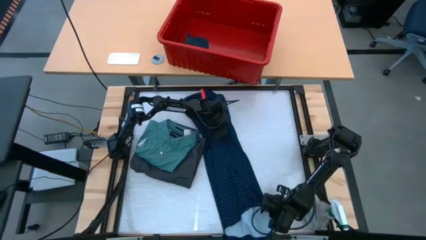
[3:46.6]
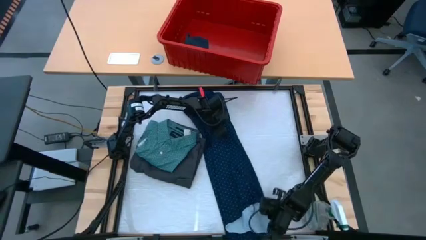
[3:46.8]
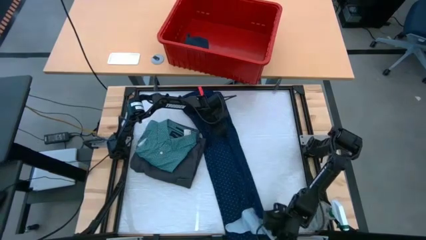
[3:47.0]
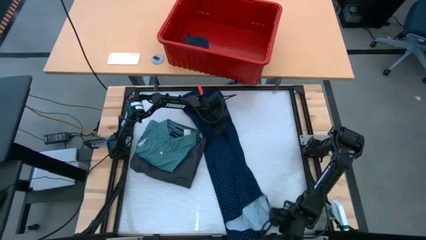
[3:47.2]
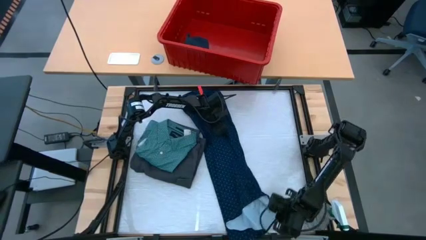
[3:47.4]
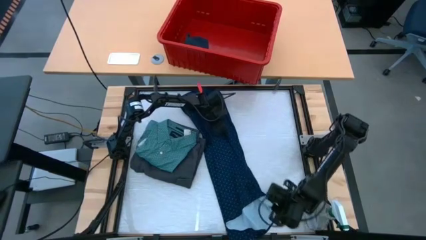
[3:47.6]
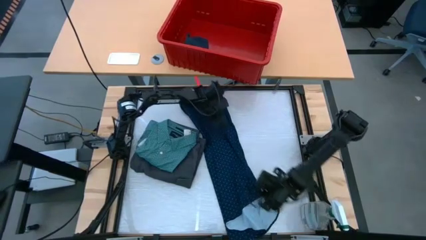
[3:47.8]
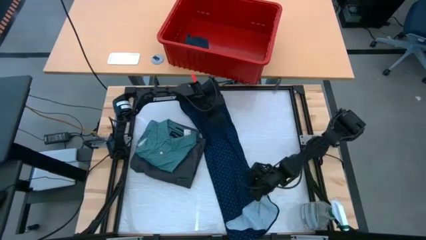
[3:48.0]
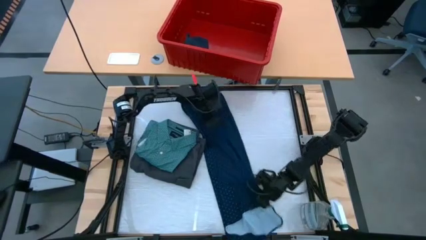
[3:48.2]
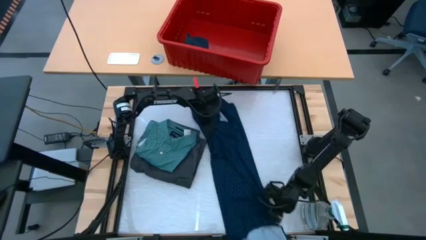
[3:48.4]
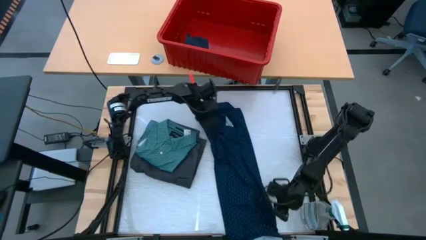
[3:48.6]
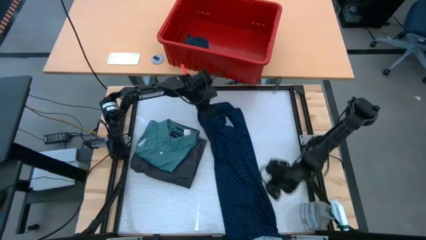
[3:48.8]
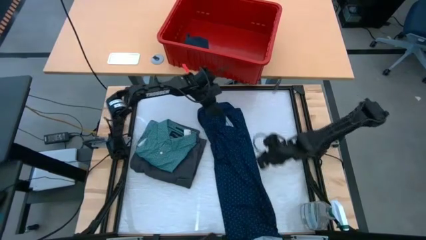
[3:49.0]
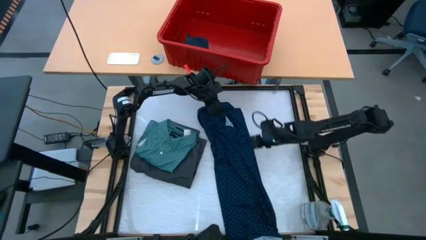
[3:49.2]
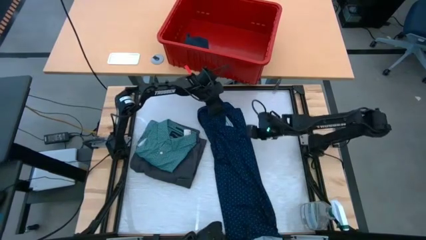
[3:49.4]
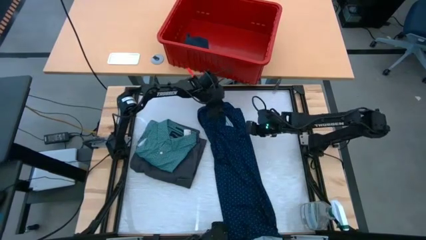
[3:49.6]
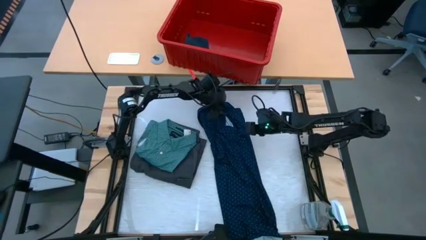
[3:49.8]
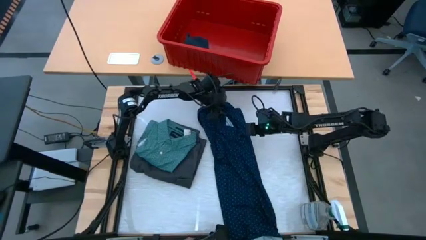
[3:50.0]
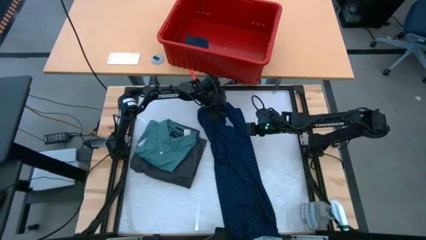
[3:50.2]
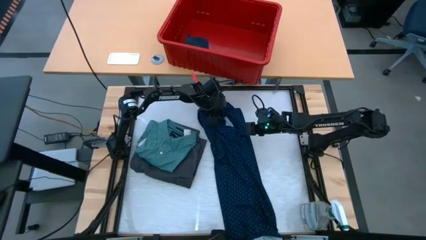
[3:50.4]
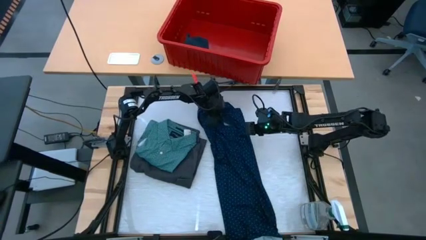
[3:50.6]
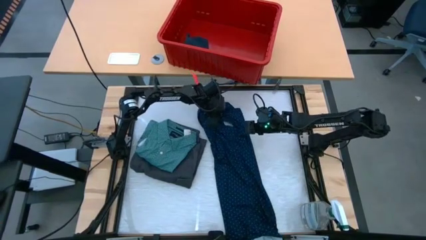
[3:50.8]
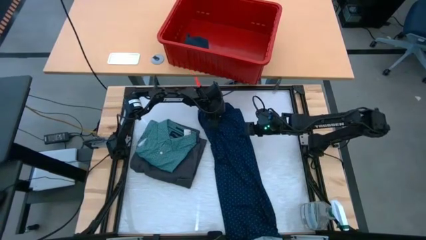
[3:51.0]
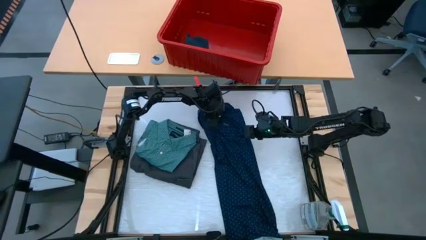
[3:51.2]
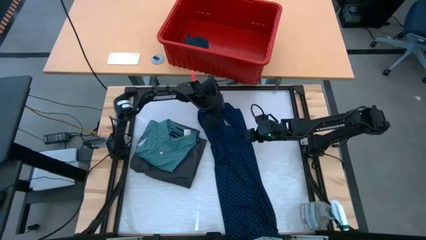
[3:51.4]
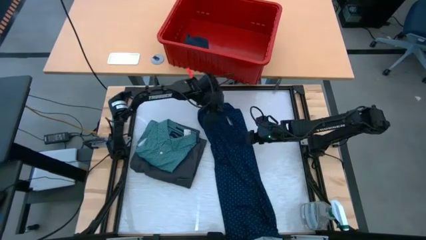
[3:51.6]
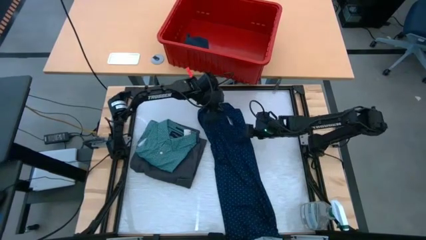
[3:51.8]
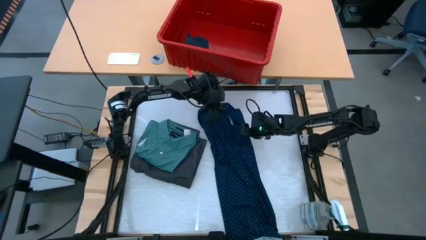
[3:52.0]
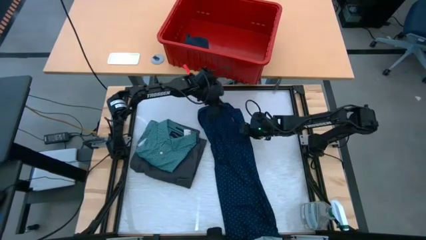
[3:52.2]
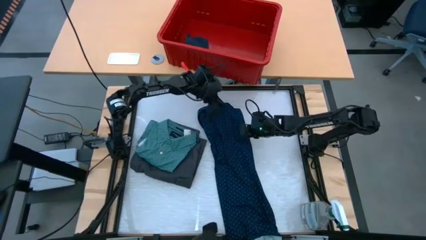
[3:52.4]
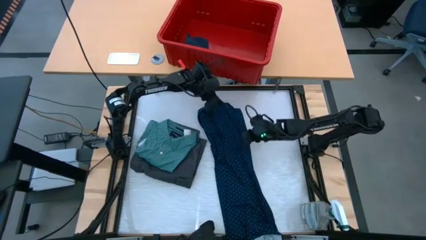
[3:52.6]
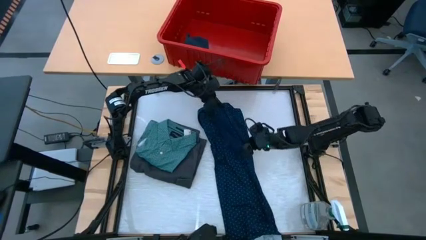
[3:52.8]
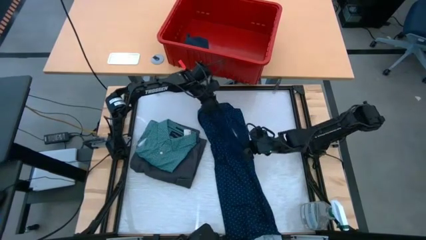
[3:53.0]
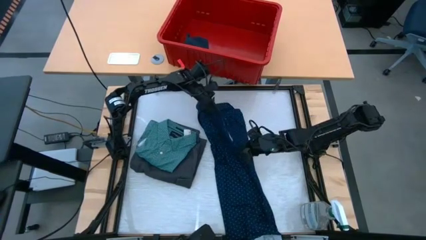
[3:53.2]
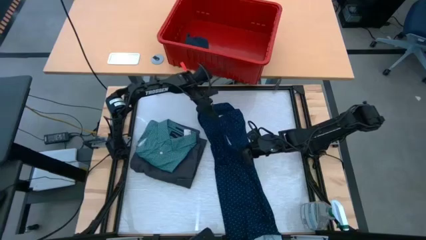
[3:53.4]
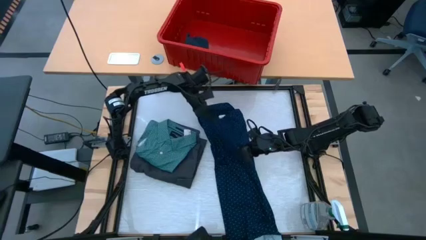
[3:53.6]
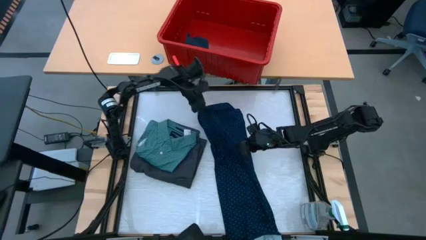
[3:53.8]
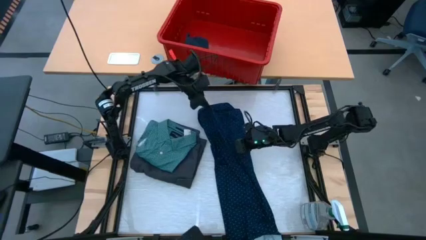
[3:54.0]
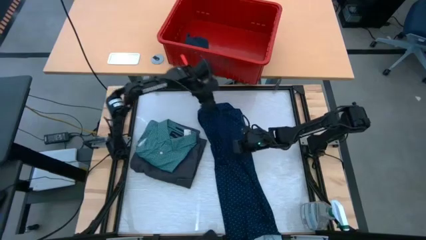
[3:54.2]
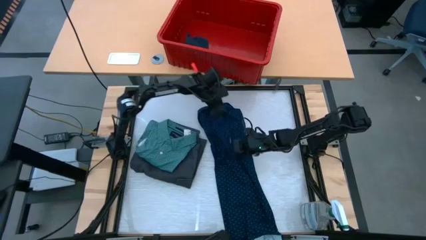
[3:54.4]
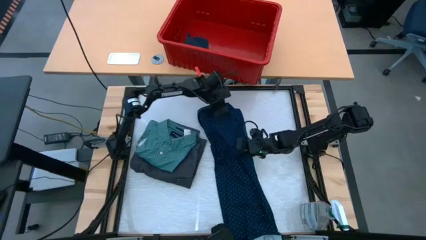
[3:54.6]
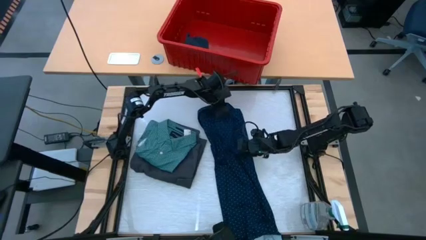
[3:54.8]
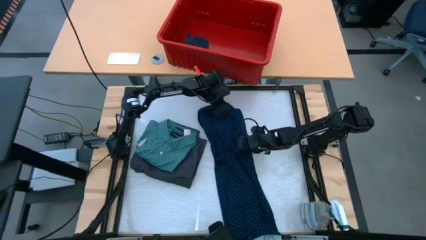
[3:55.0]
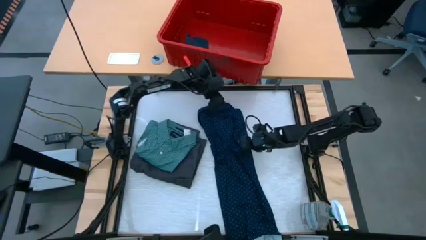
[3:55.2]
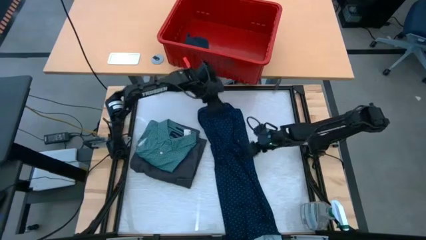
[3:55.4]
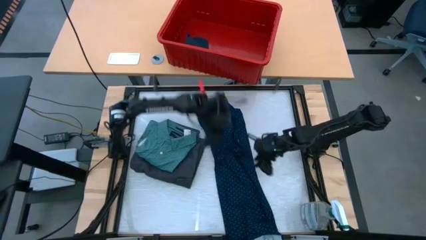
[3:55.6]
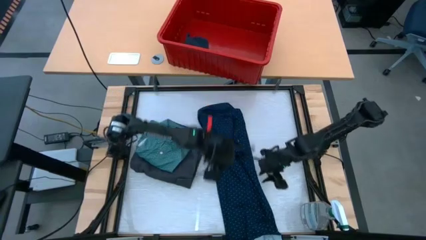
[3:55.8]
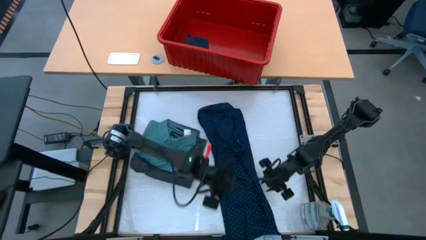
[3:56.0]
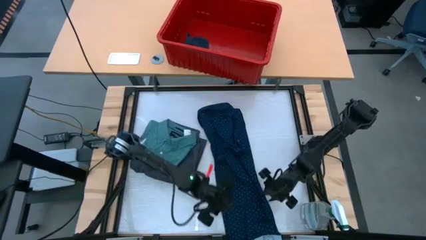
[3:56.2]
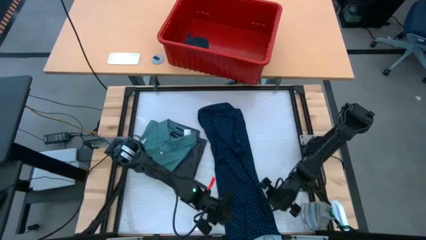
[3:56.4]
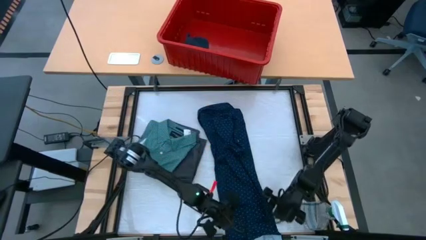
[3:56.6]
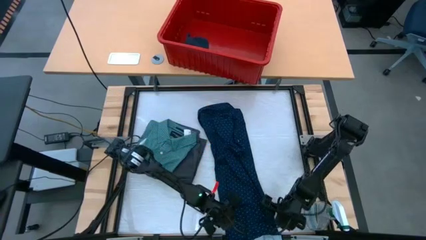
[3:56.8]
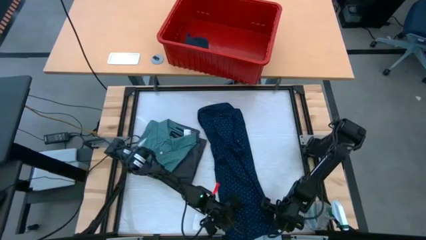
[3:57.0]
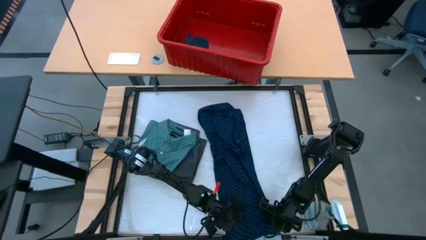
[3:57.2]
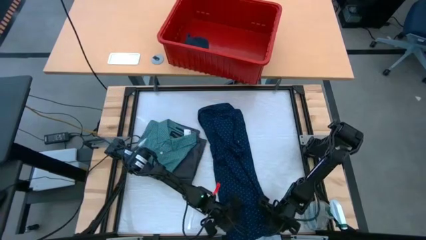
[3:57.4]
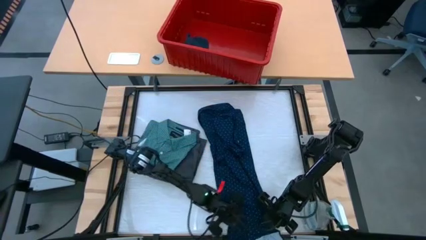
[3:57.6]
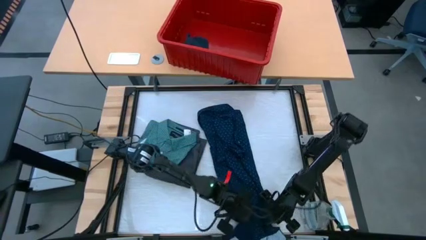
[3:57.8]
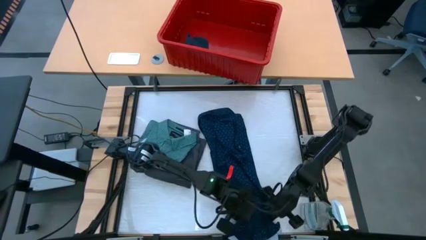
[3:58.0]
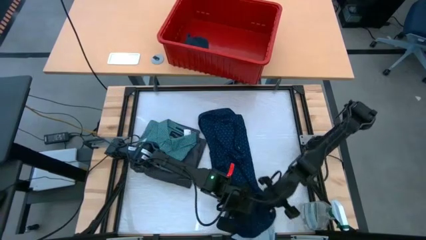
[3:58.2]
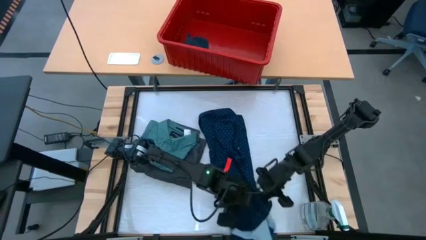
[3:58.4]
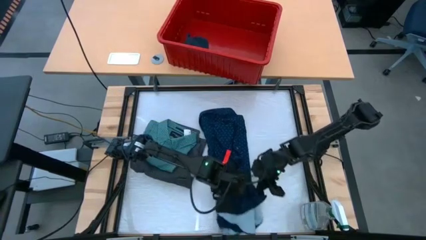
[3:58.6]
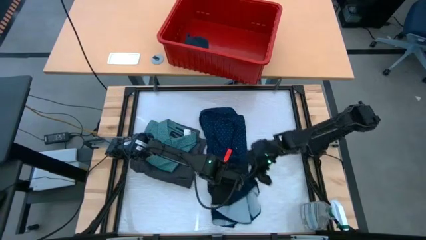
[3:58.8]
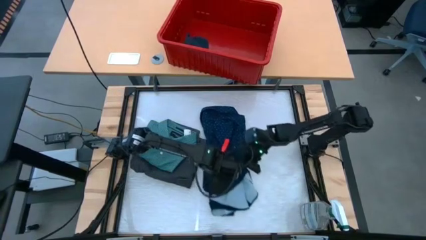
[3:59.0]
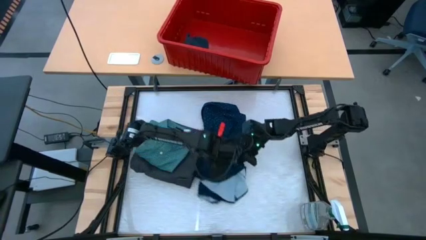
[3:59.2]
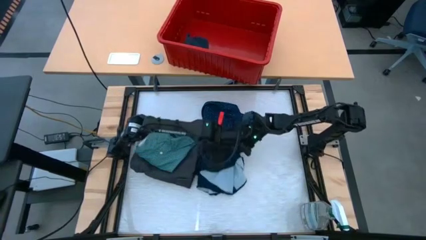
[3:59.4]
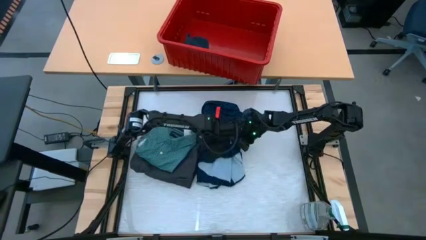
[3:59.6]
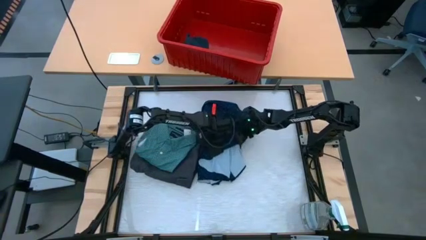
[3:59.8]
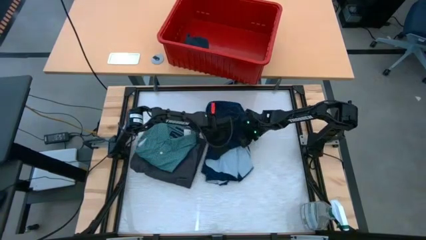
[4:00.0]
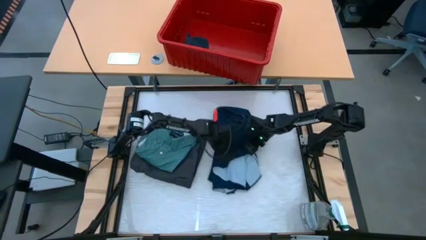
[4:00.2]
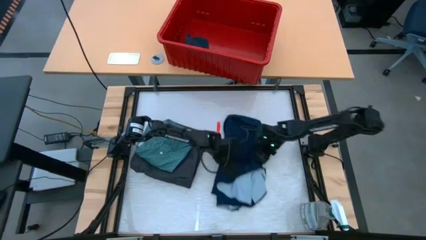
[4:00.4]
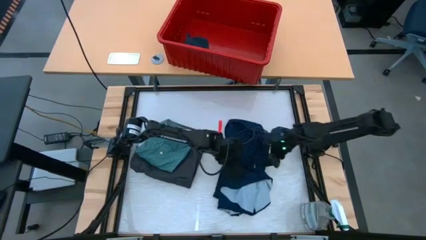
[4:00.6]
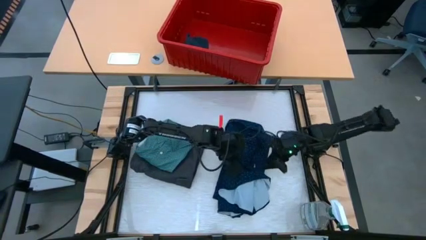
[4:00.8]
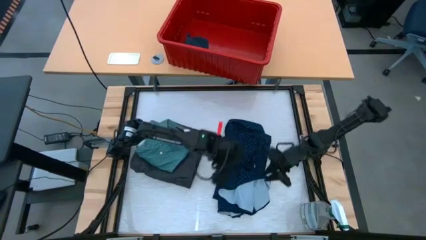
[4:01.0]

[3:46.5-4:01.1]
Task: Fold laundry
Fold the dark blue polo

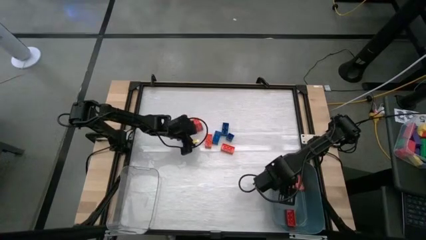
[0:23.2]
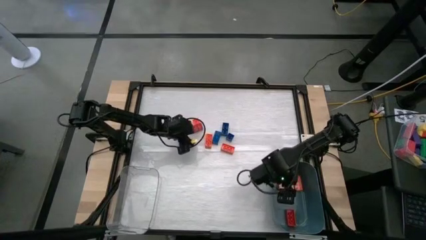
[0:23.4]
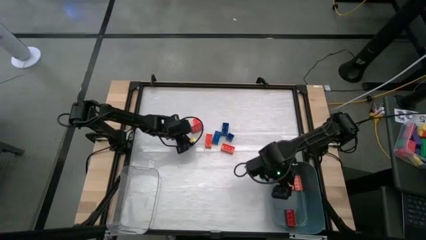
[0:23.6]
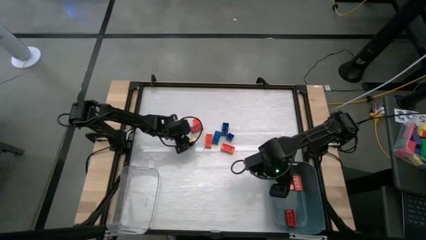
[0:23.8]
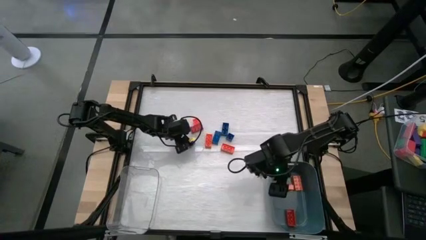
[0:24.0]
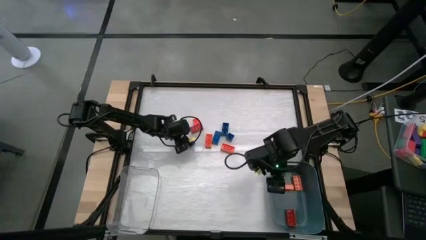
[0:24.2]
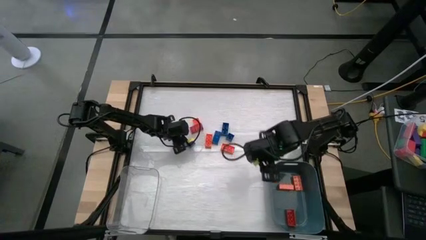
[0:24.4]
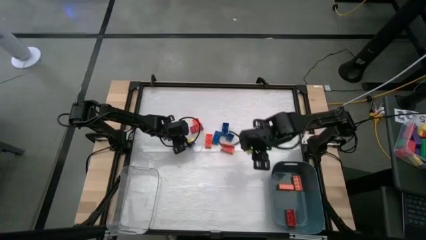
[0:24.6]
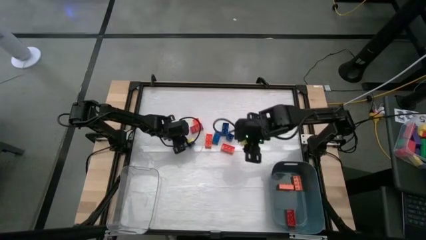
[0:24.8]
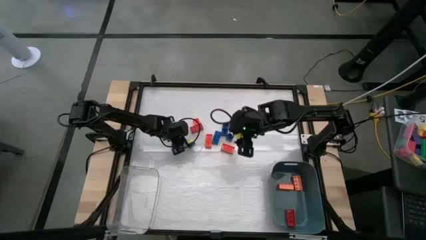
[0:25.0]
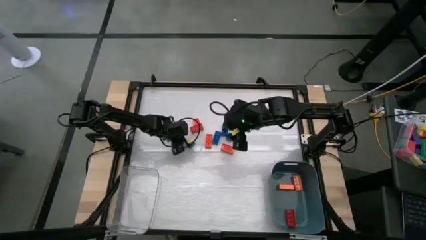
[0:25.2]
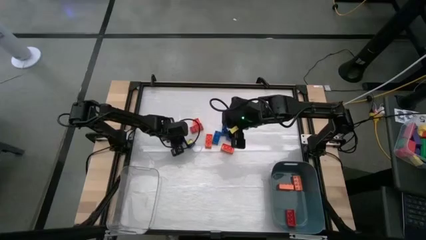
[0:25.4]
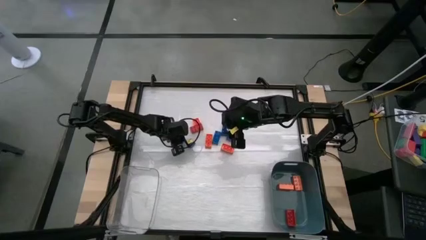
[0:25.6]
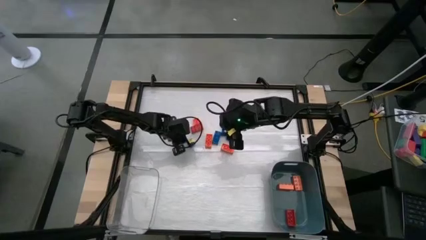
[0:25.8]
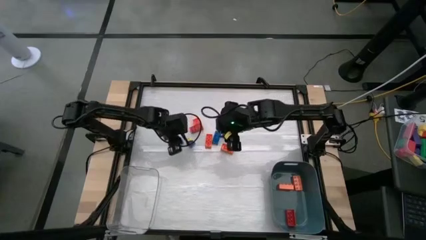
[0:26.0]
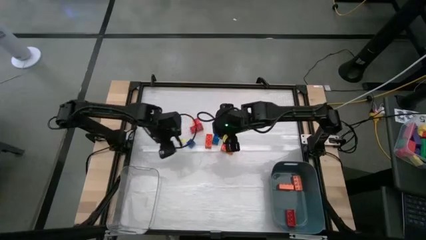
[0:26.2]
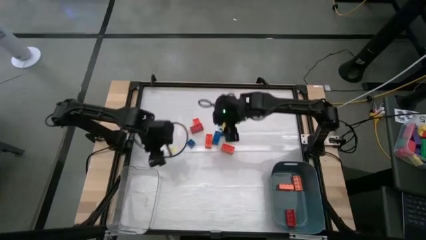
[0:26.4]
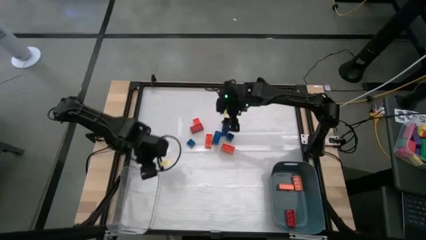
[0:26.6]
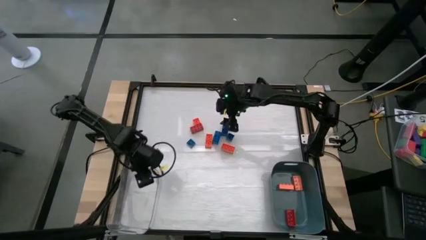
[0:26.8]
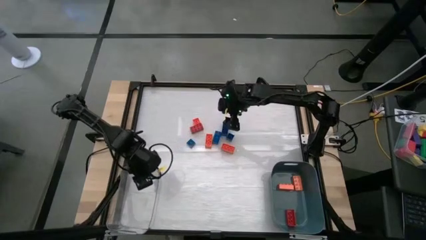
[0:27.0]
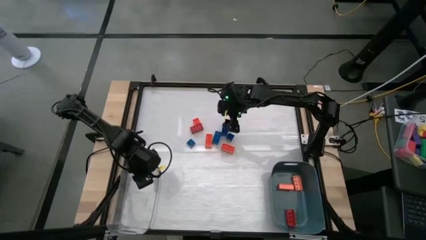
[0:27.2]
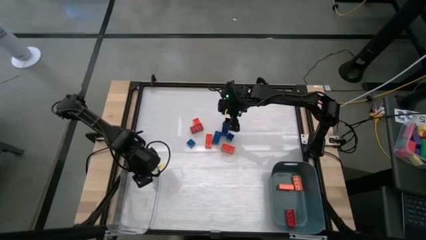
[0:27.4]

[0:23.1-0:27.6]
Task: Sort blocks by size
Put the small blue game piece into the transparent bin
